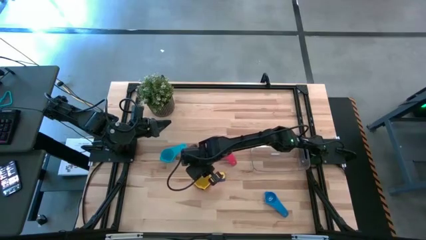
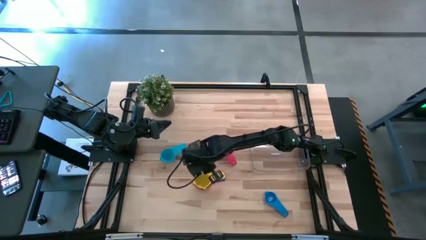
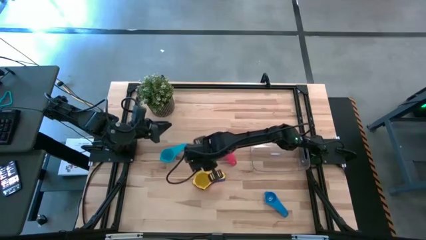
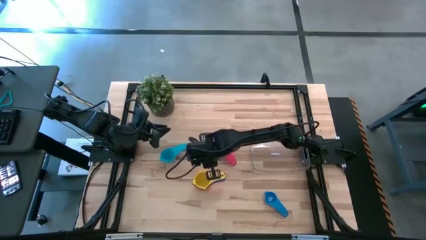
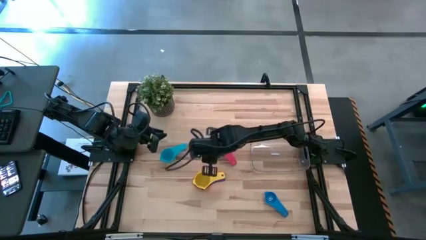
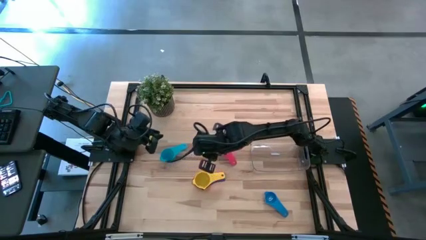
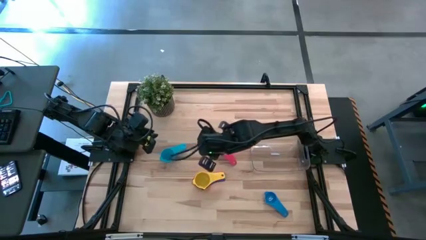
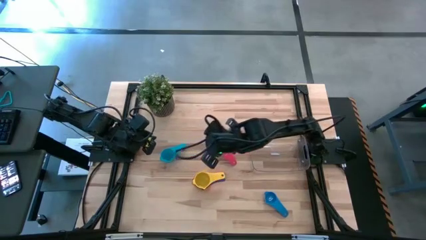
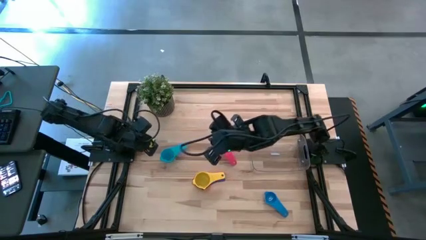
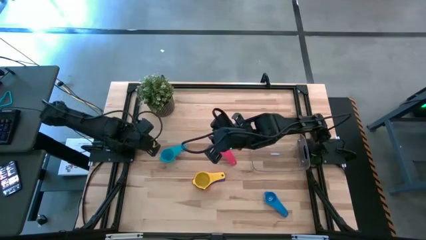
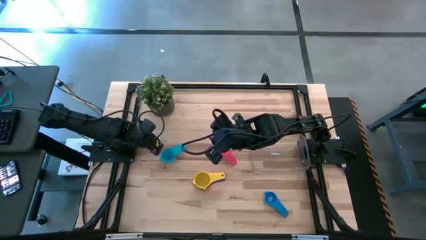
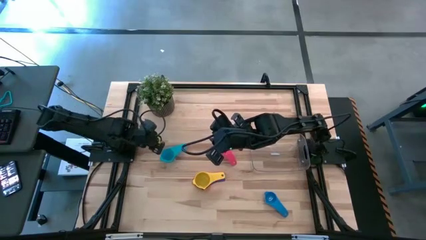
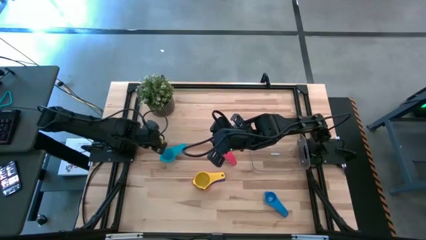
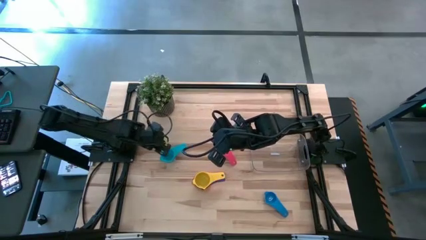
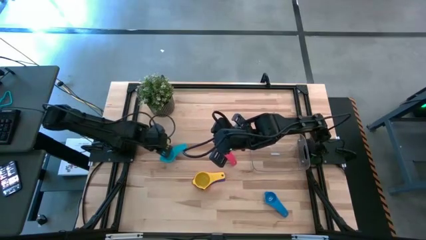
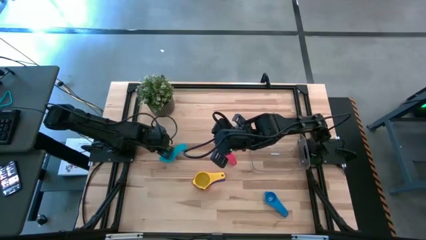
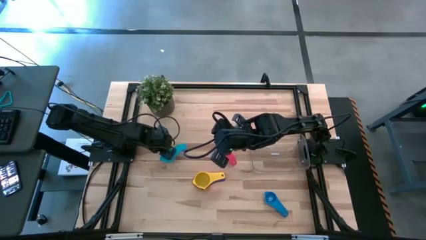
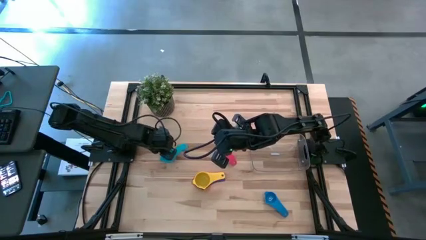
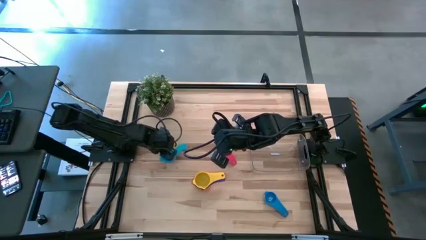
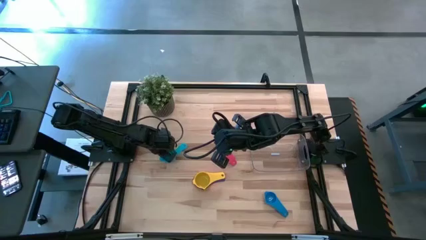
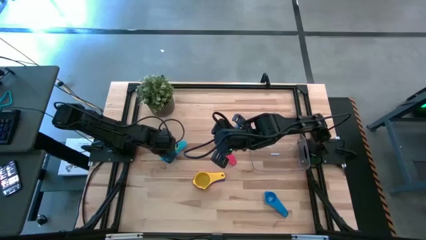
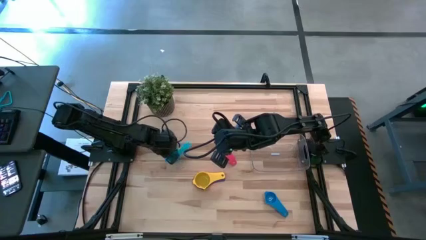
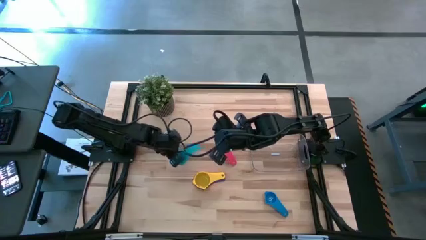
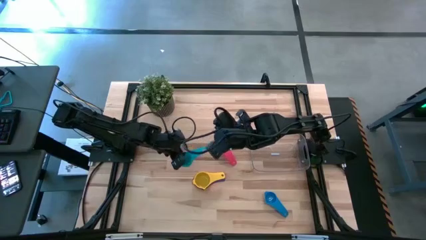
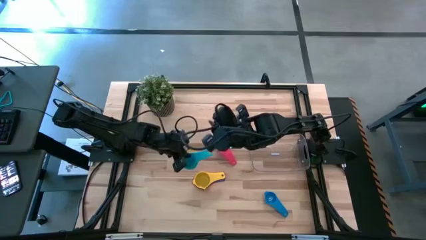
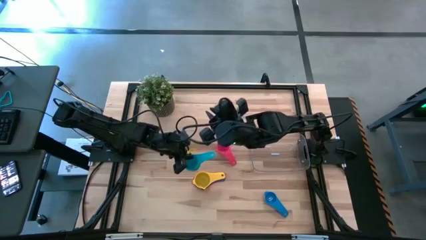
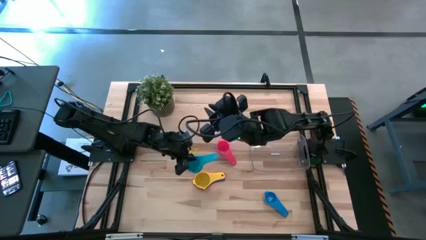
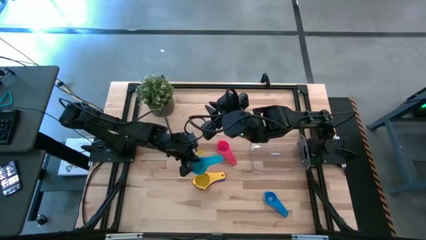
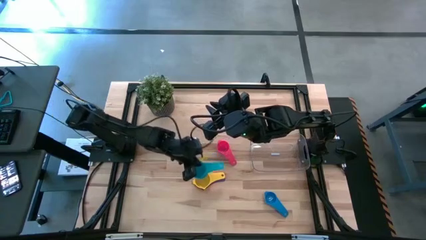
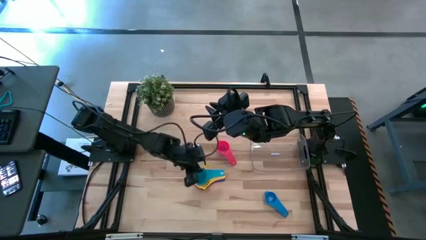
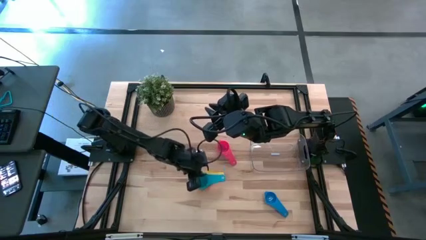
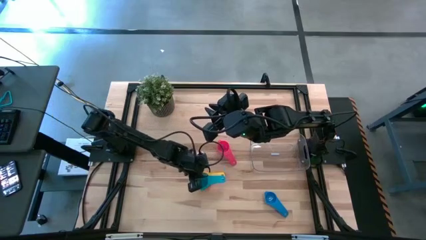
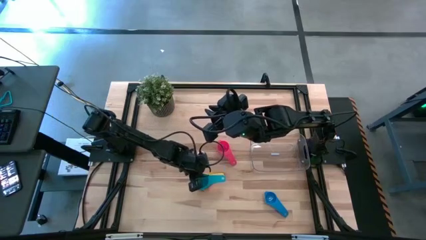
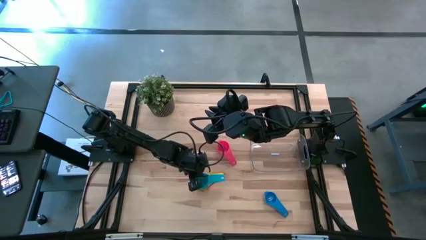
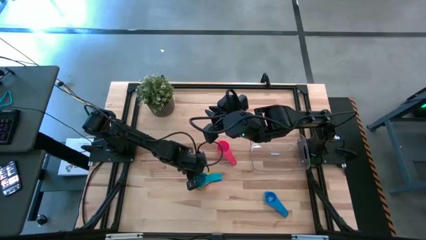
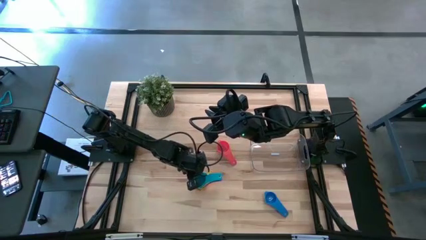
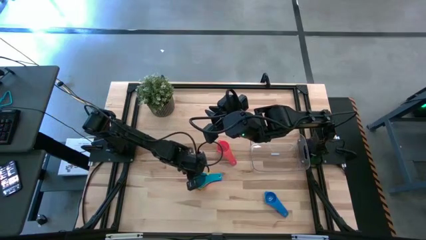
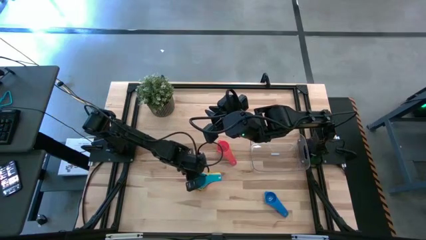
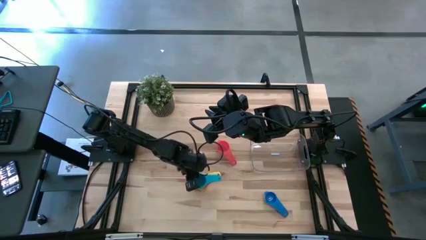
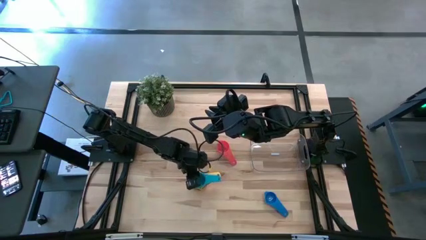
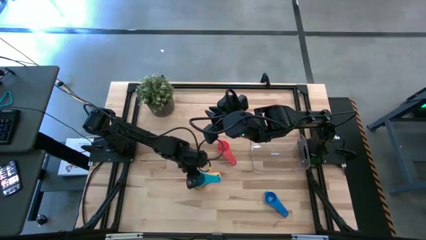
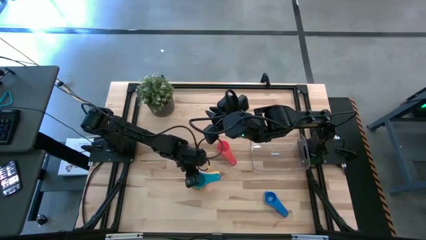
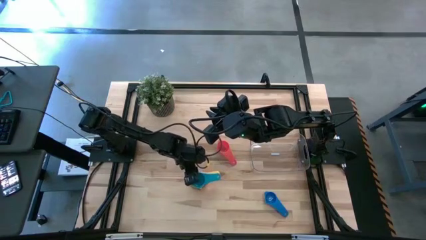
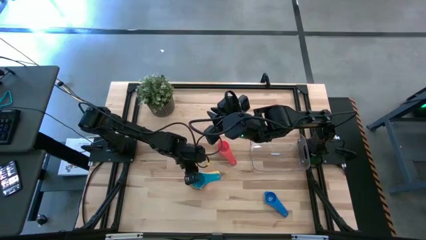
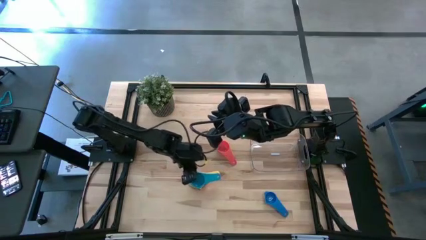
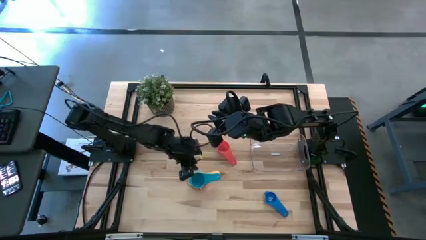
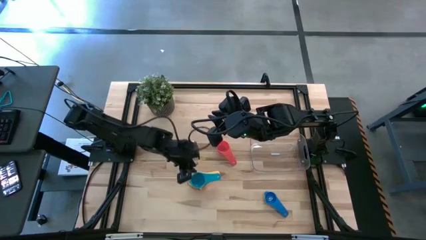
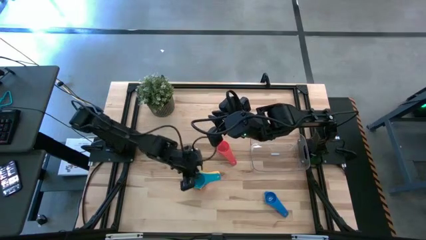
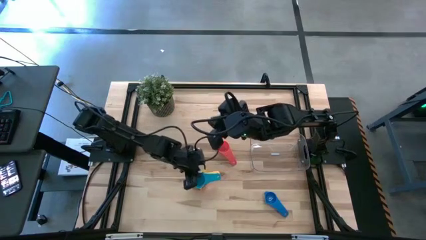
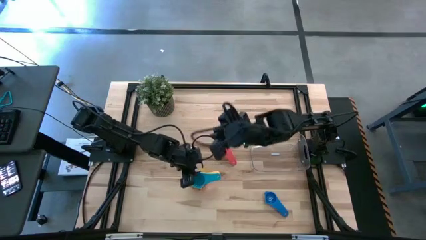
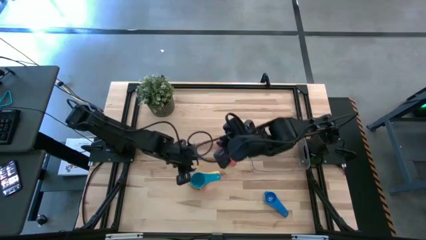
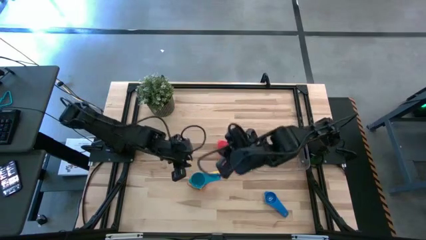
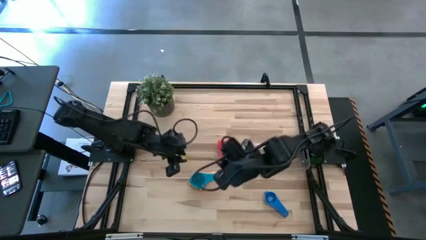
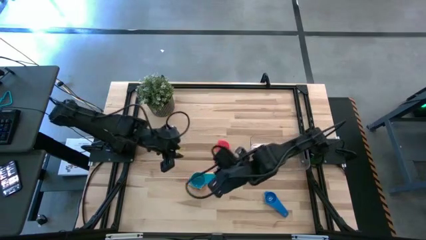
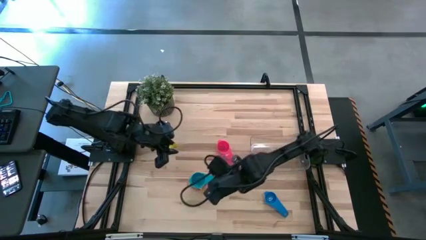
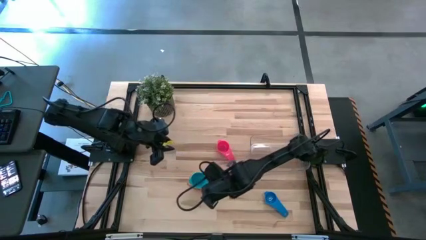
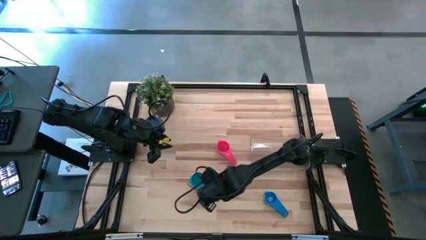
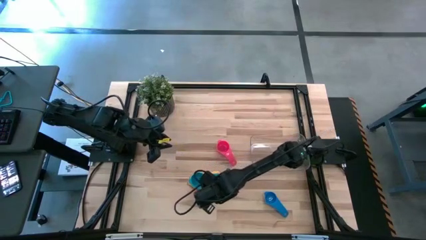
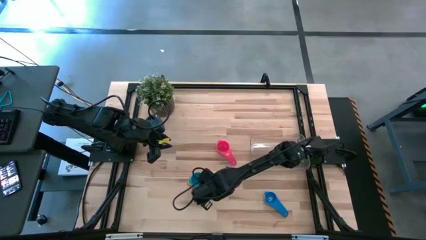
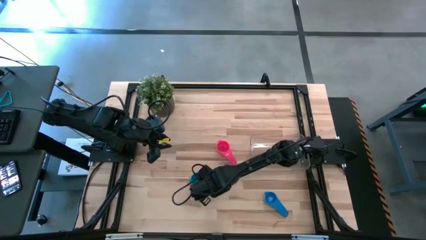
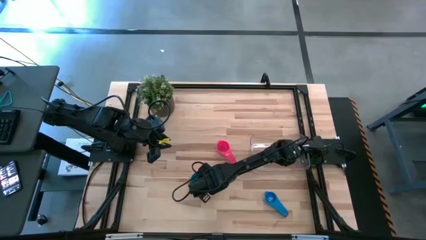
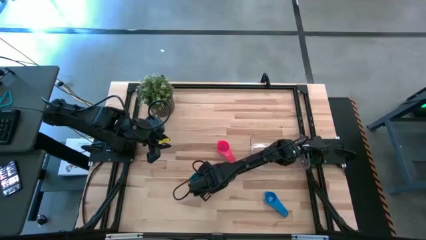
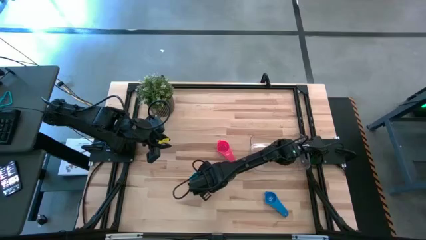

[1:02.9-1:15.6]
Task: Nest measuring cups in basket
Stack the light blue measuring cup on top of the yellow measuring cup

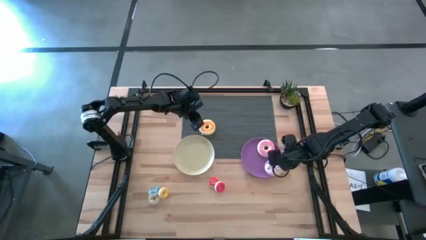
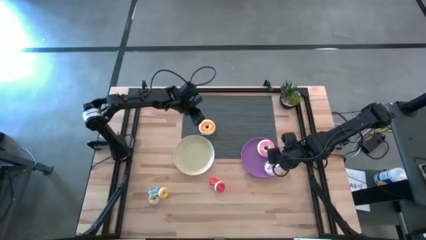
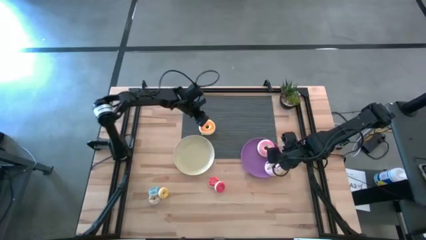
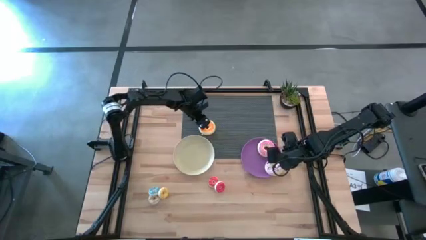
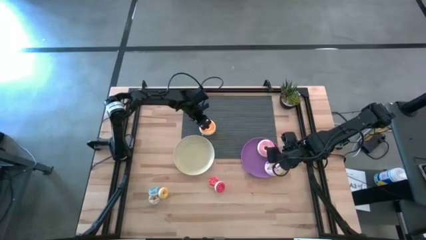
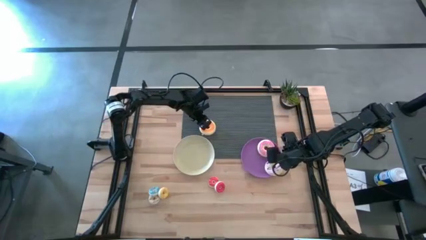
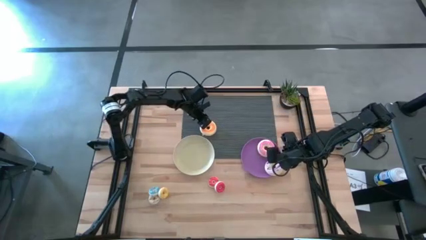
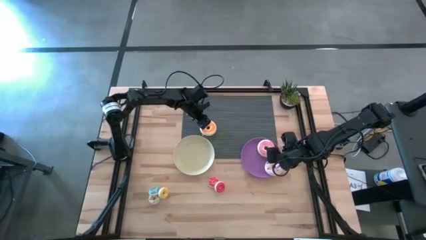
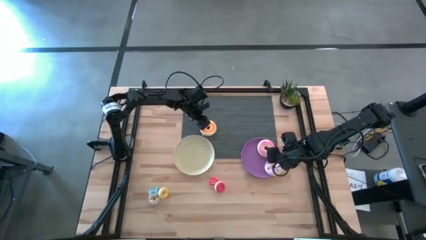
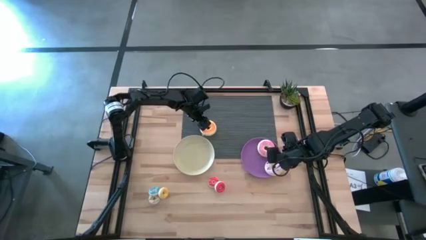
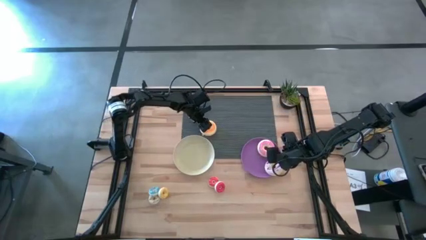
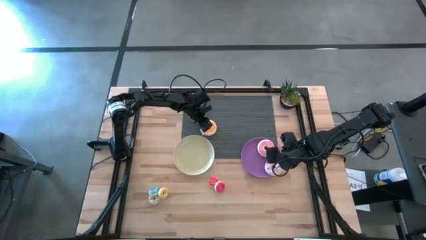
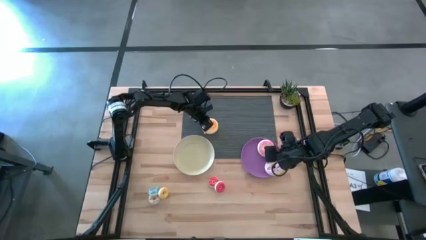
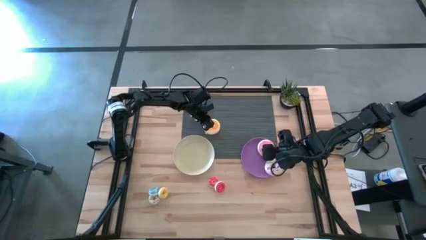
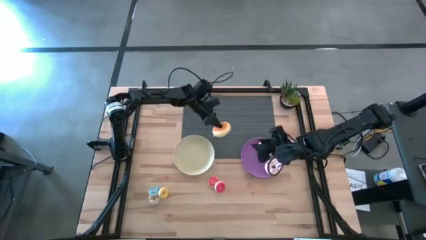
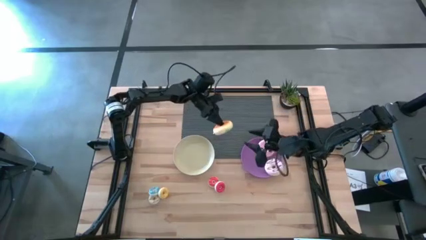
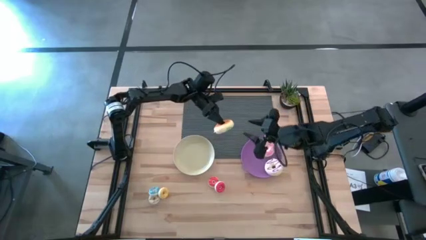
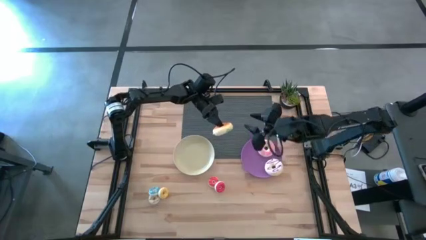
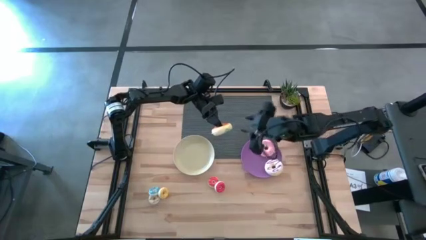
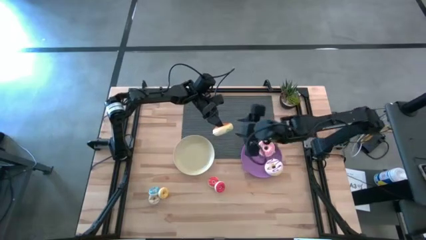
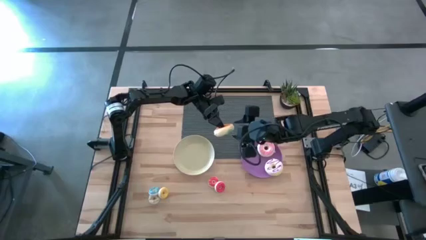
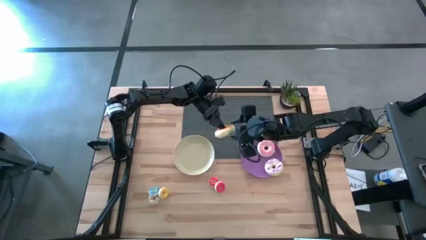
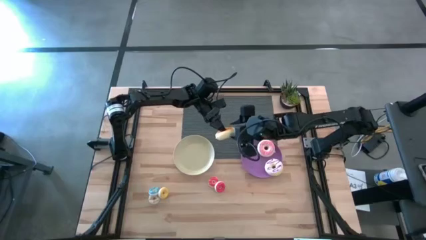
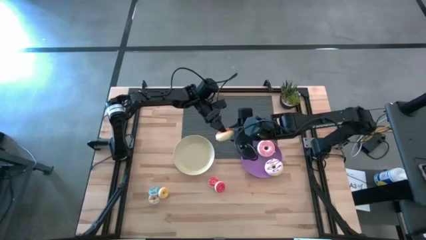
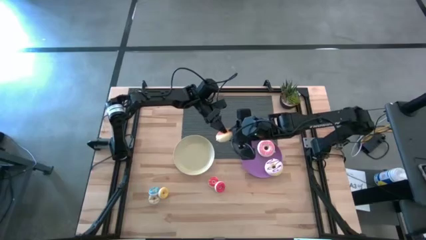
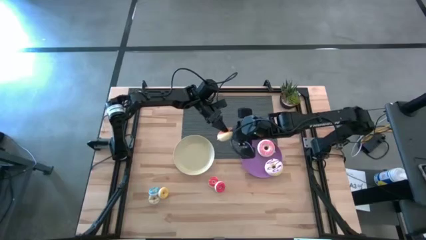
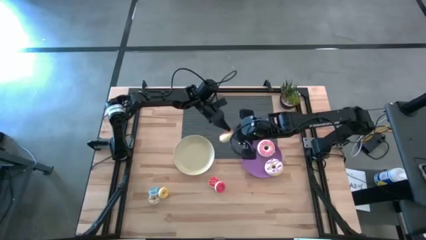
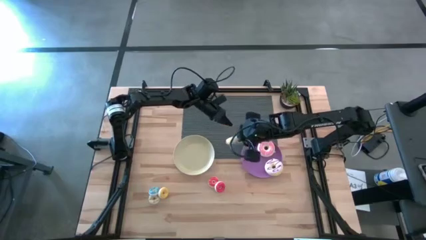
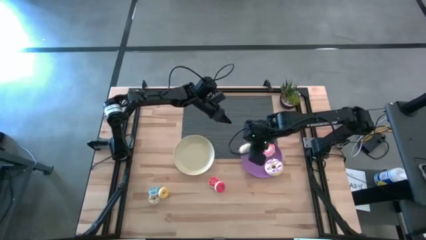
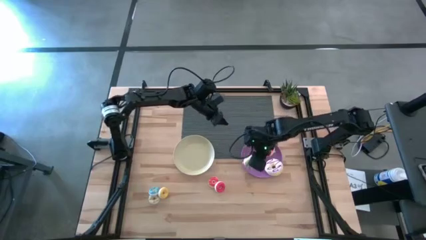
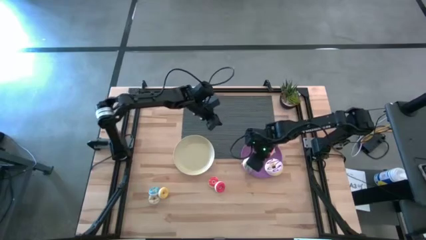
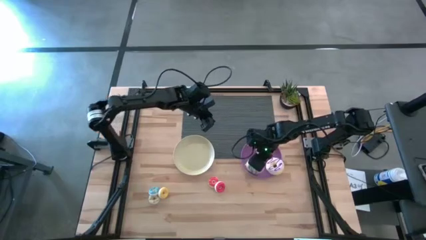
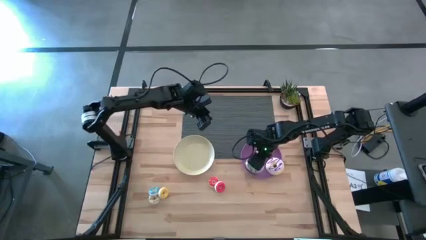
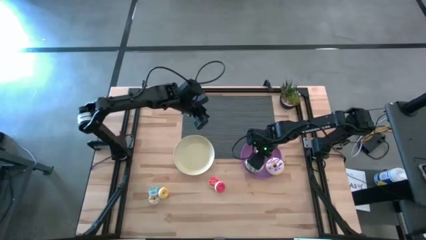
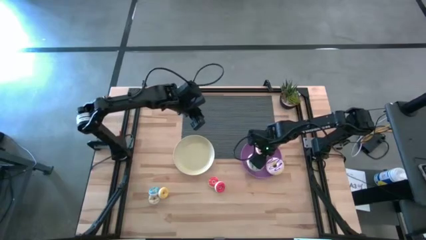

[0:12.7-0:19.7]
Task: Pick & Place donuts
Put the big light blue donut on the purple plate
